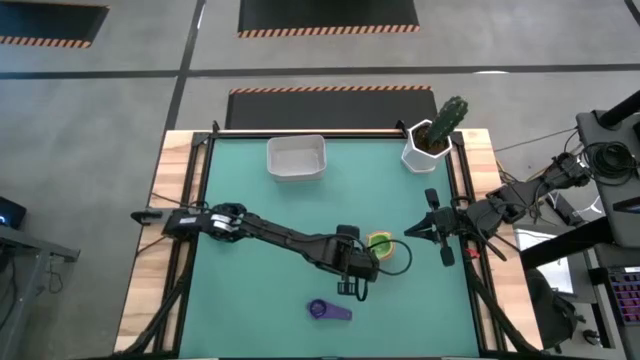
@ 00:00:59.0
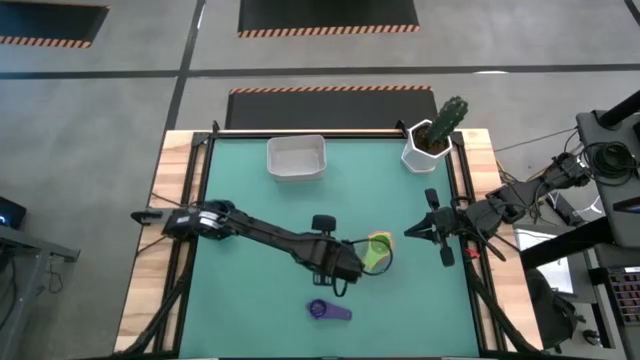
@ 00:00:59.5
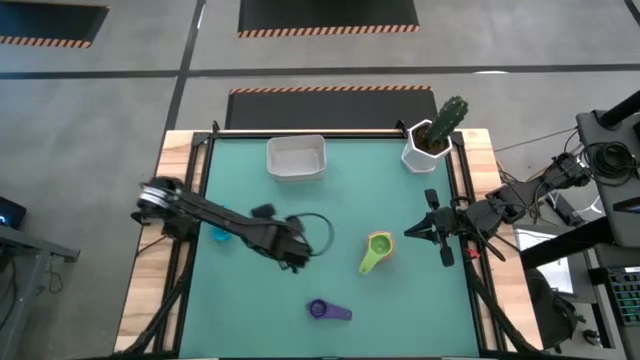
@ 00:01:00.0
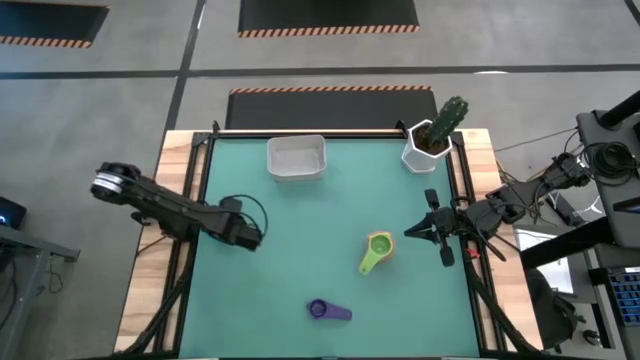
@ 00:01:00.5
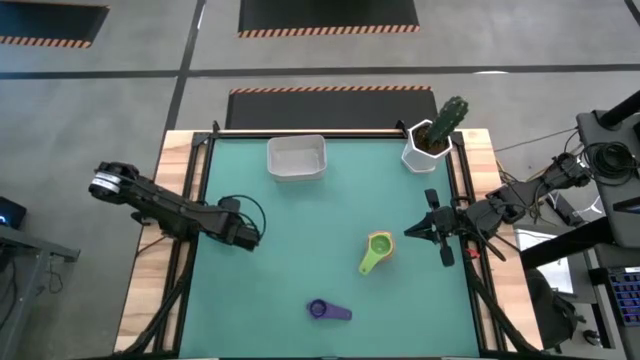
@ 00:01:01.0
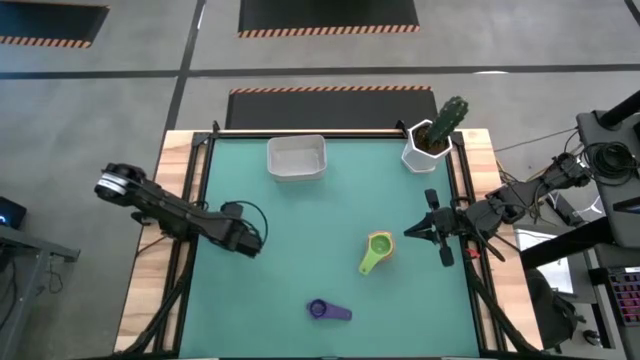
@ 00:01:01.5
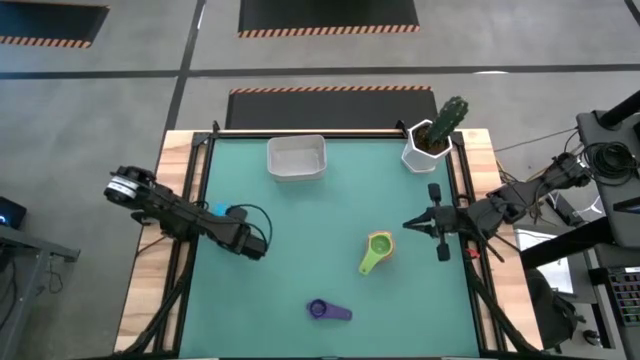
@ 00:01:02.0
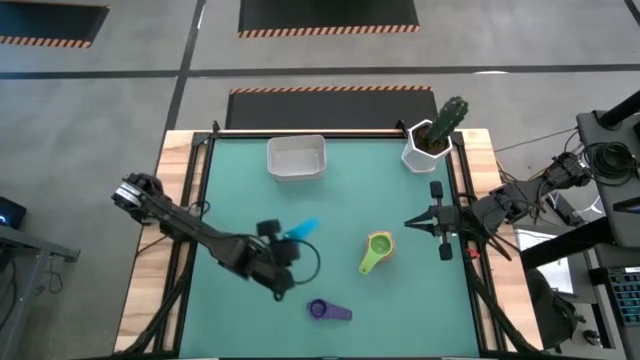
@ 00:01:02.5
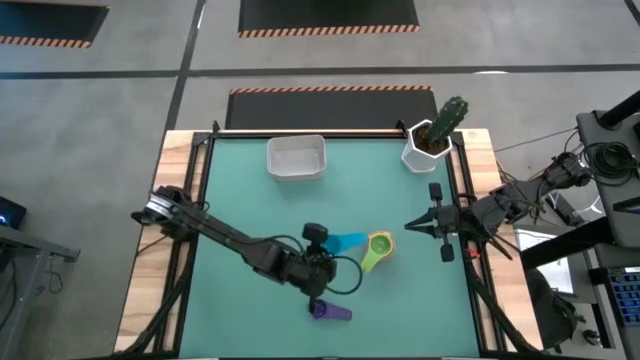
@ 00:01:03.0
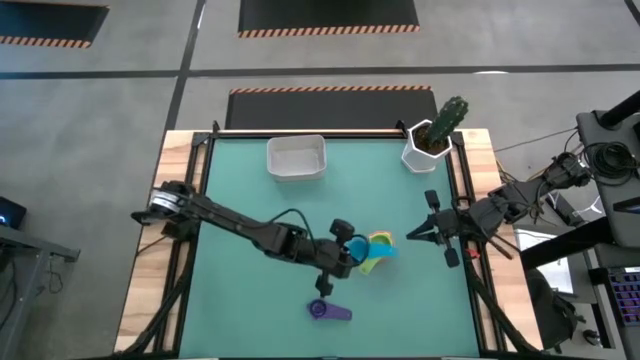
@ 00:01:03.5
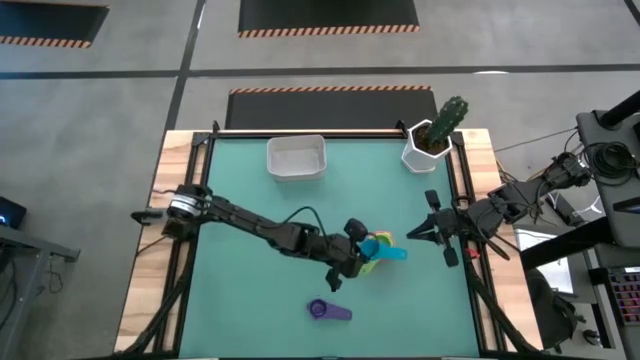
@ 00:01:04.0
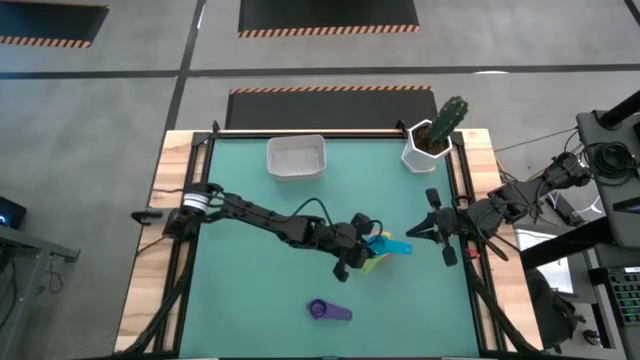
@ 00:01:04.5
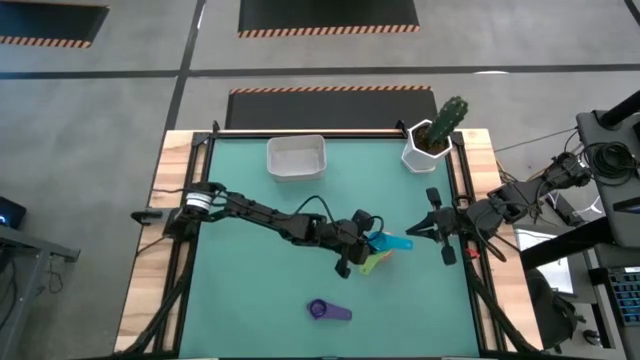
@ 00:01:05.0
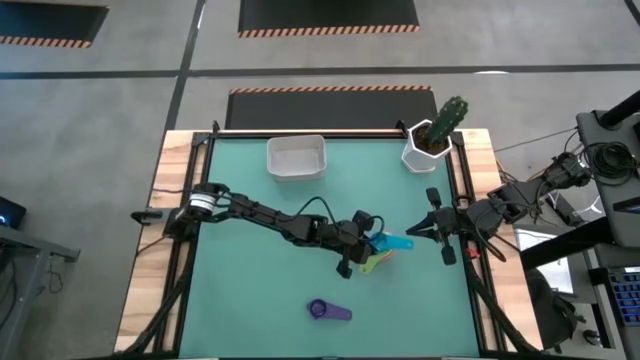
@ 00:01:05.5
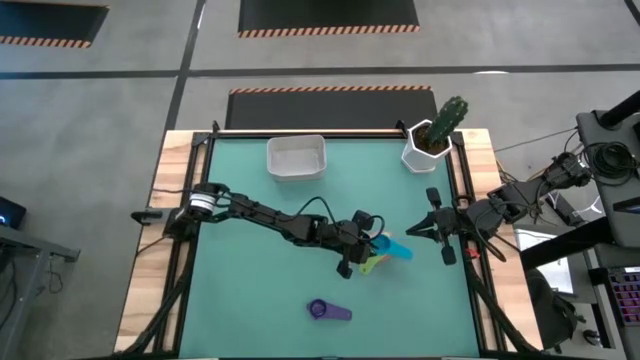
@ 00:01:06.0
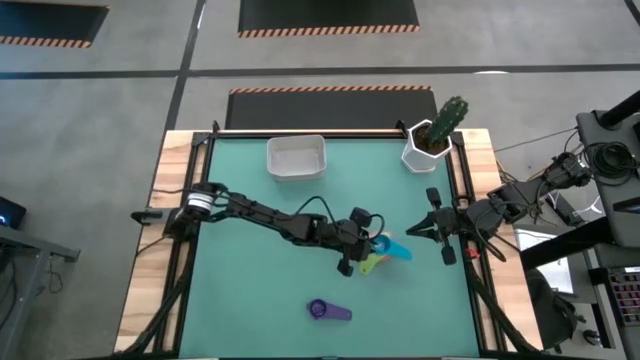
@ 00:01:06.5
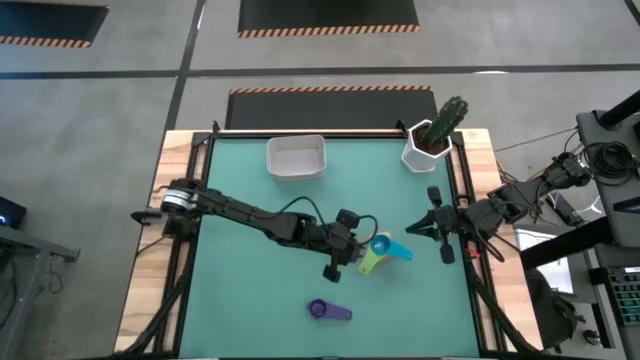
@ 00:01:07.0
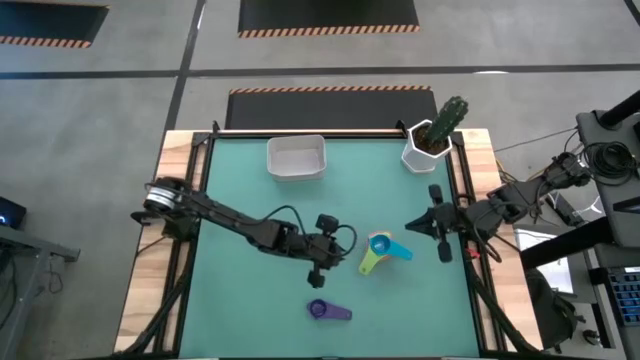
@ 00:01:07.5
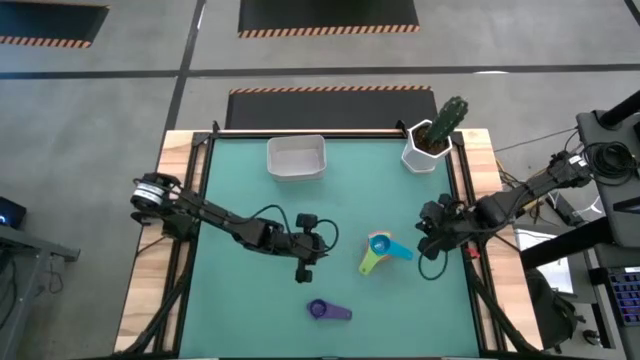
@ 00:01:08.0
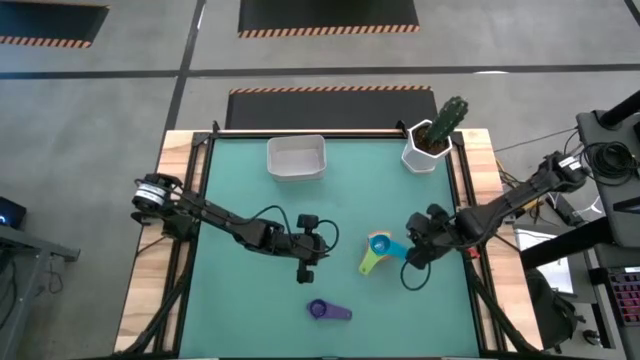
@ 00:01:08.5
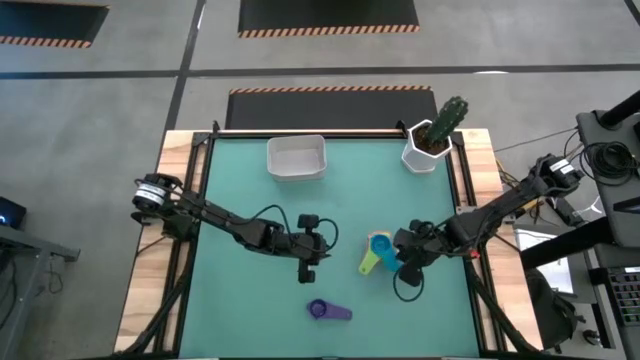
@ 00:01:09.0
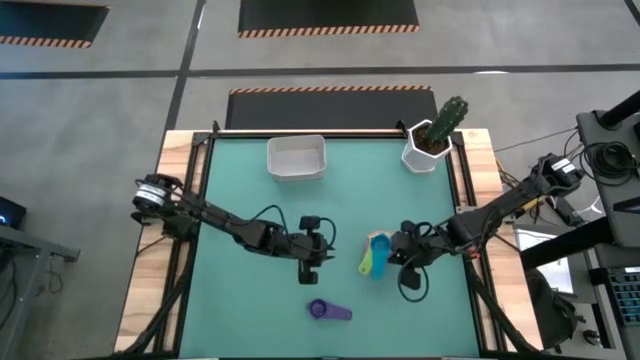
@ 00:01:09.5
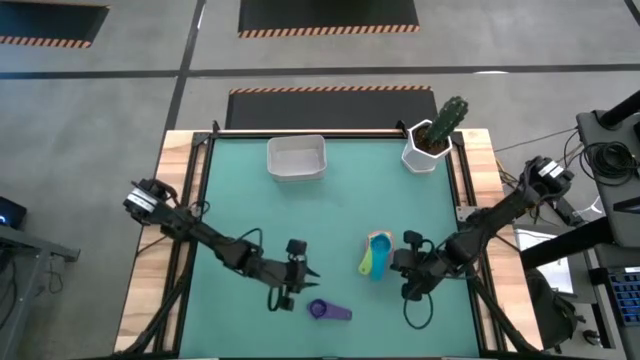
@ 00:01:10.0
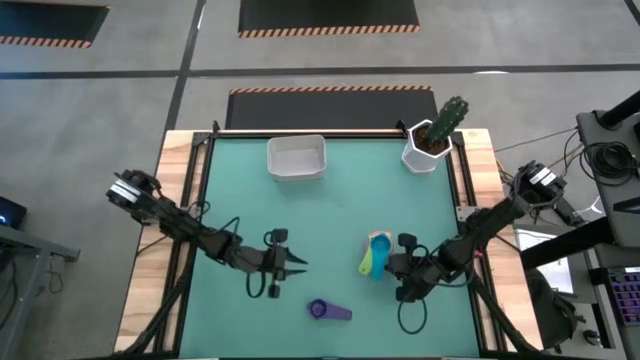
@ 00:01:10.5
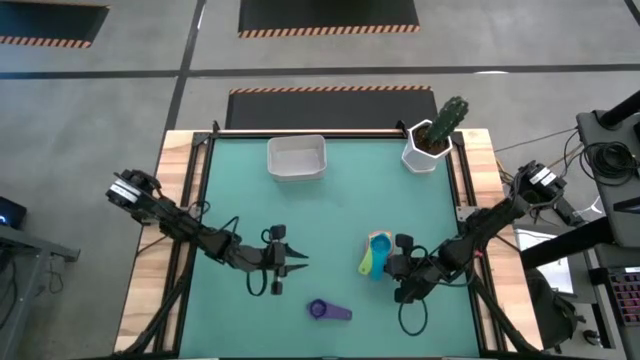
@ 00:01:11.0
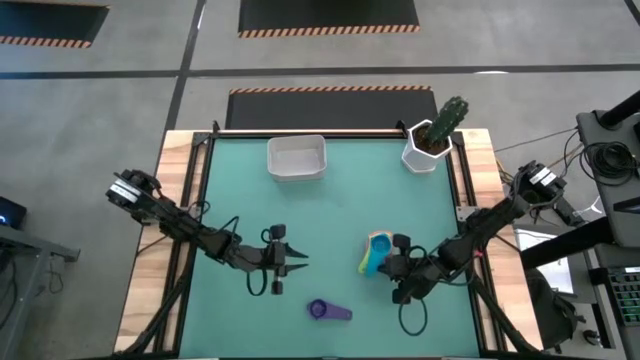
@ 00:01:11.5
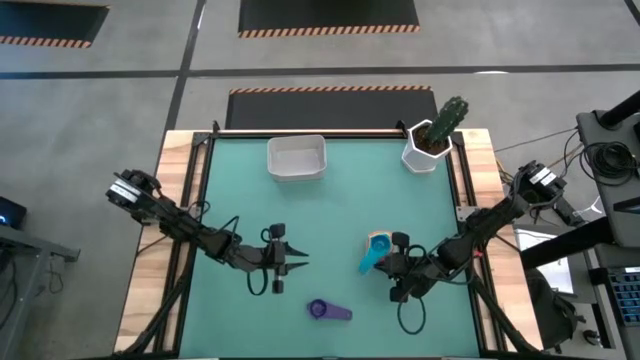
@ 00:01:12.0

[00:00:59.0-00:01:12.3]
Task: Nest measuring cups in basket
Stack the light blue measuring cup on top of the green measuring cup

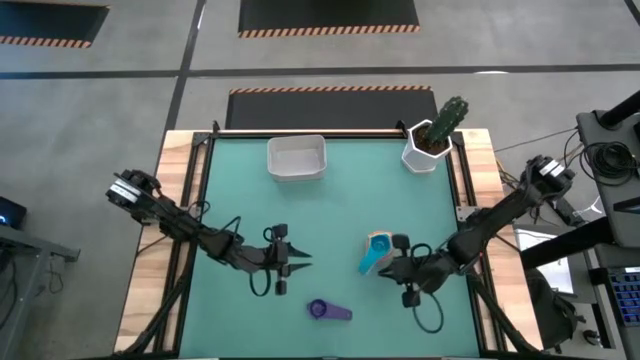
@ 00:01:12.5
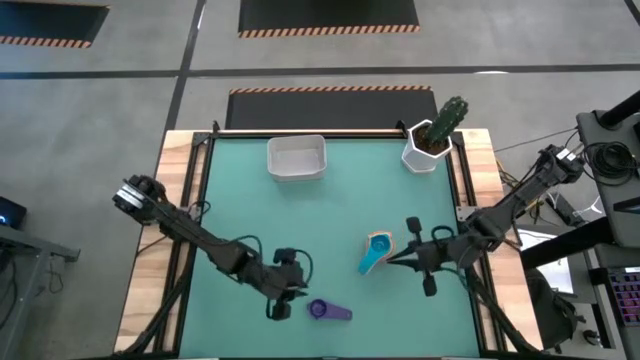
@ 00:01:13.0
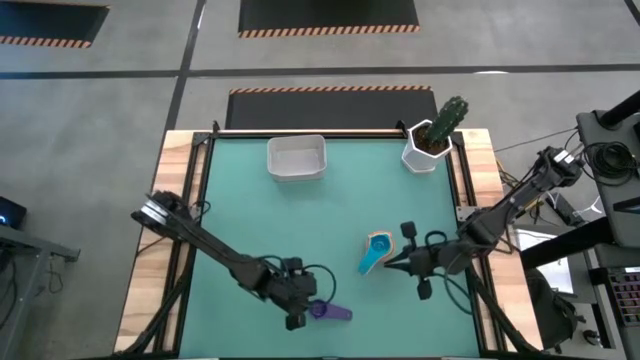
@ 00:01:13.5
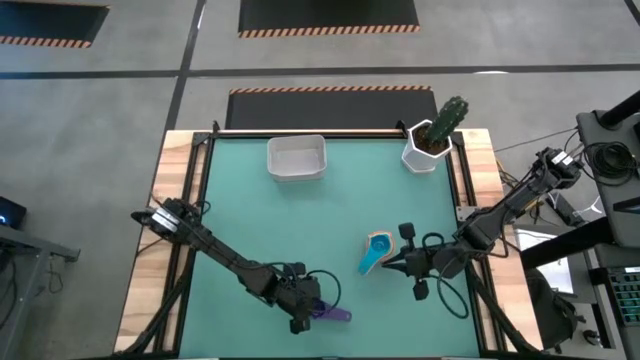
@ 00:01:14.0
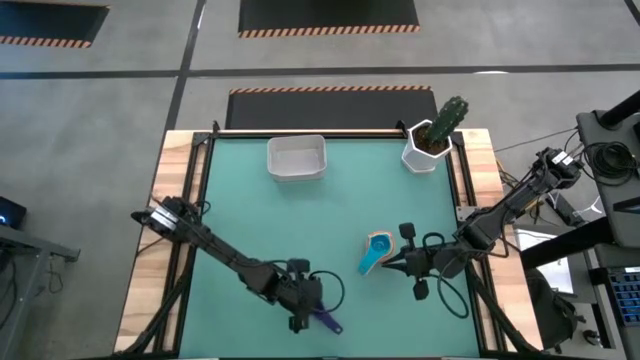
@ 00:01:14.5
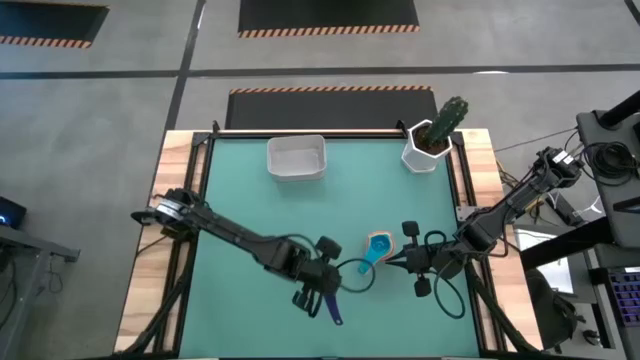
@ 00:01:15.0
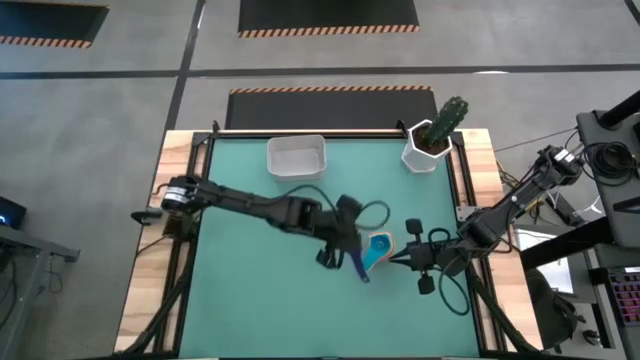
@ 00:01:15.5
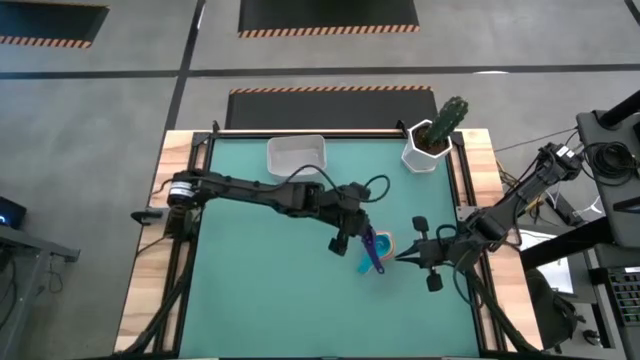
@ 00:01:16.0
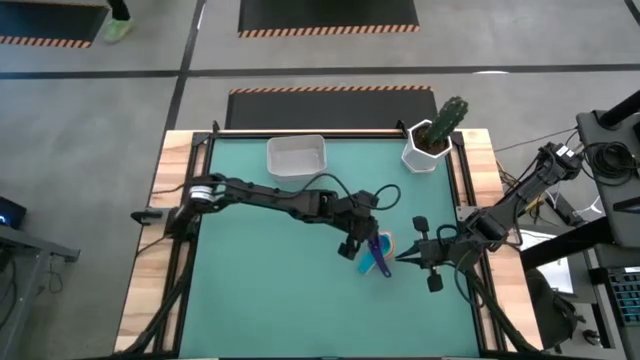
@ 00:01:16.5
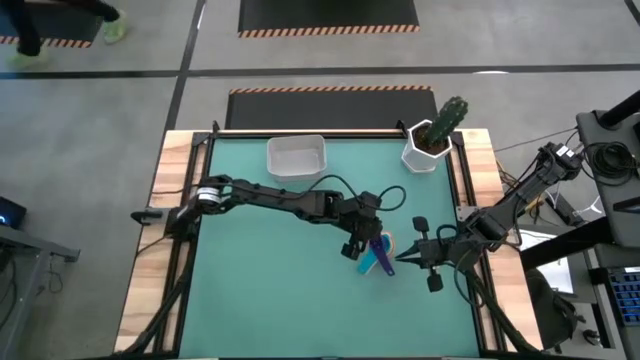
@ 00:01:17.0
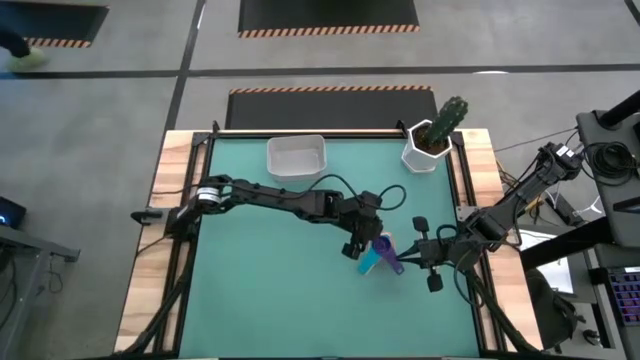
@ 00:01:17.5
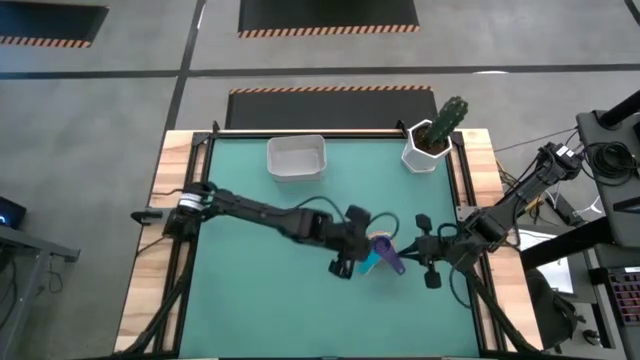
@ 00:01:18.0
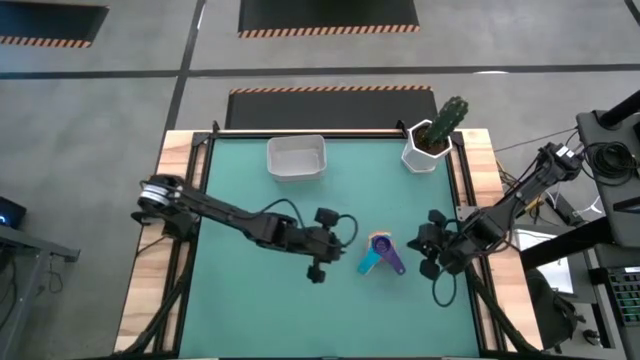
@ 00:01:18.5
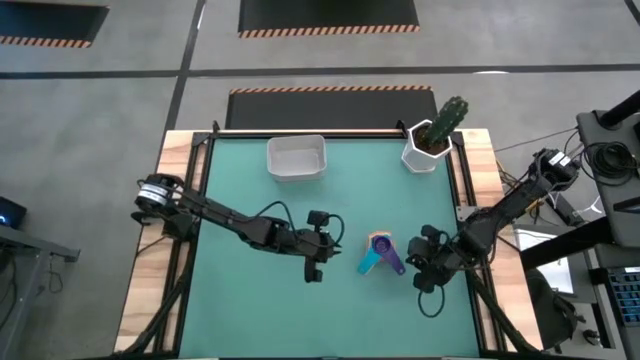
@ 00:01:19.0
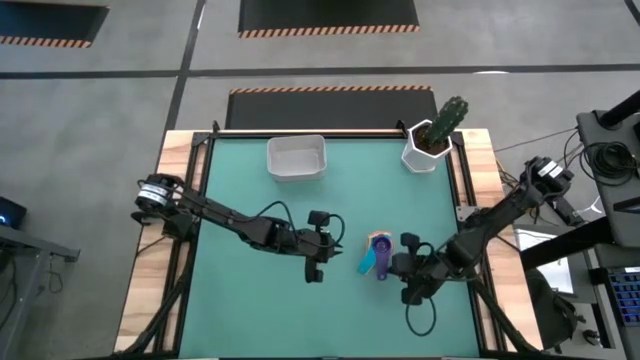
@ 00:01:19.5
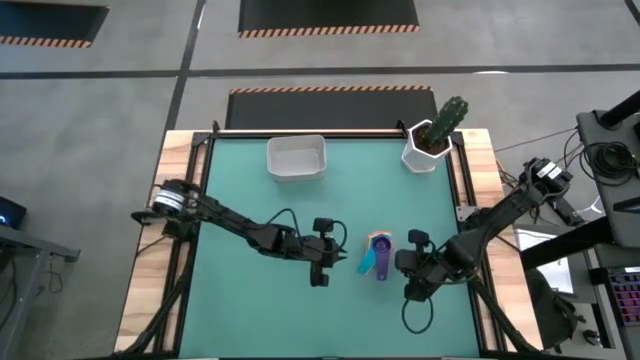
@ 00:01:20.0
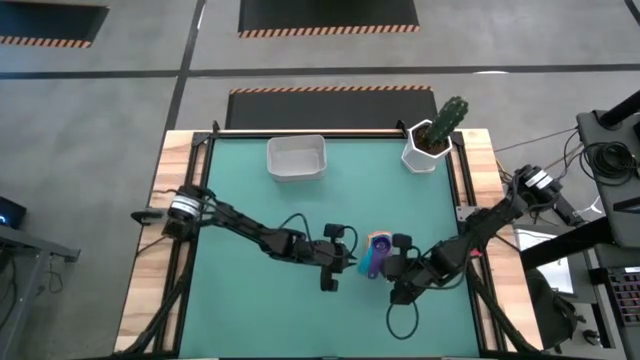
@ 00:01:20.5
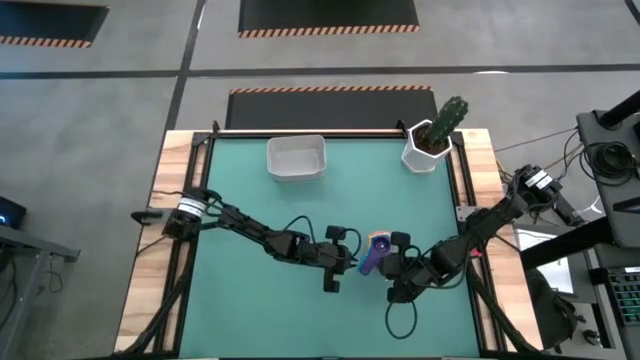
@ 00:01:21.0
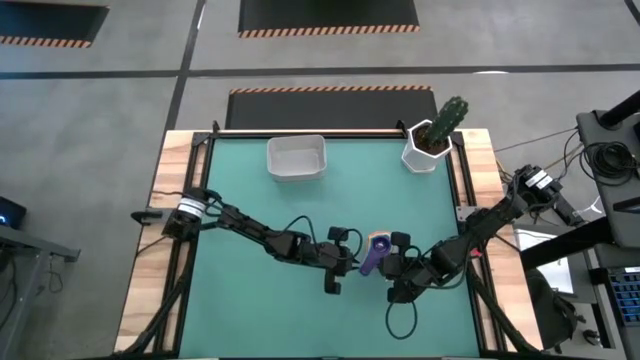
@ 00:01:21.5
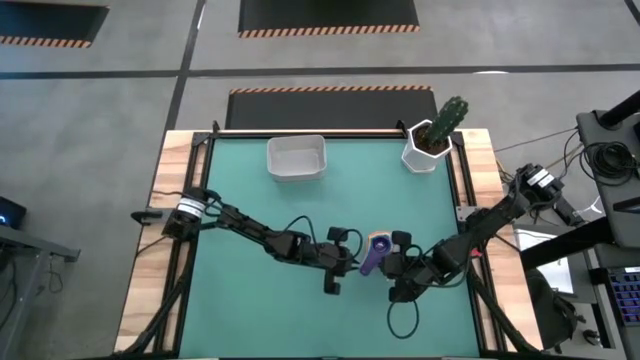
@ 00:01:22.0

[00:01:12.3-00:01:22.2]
Stack the purple measuring cup on top of the light blue measuring cup
